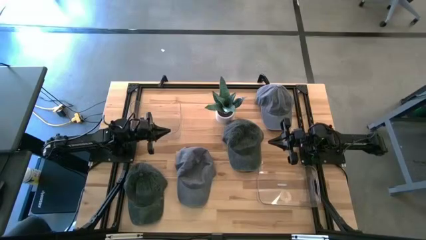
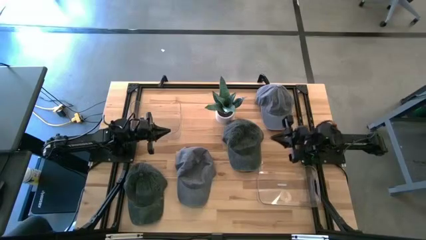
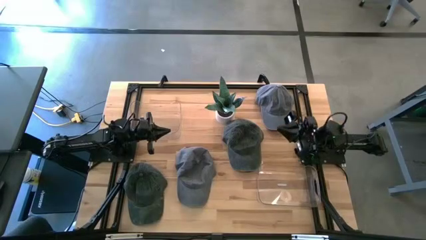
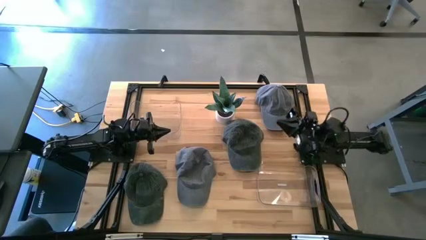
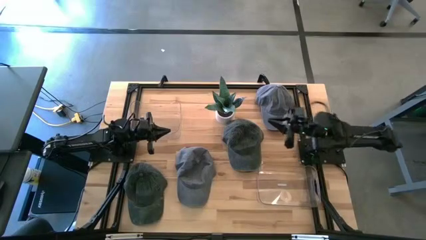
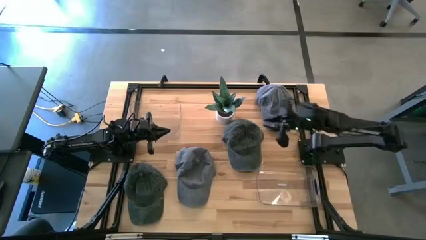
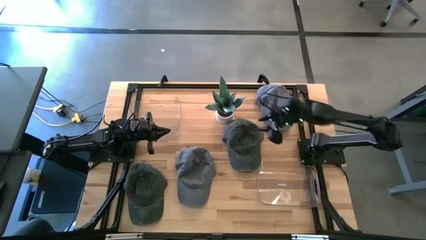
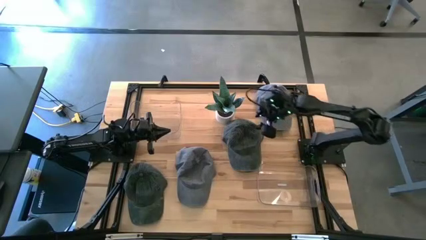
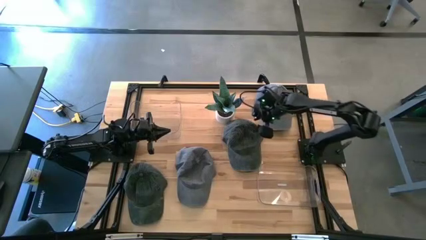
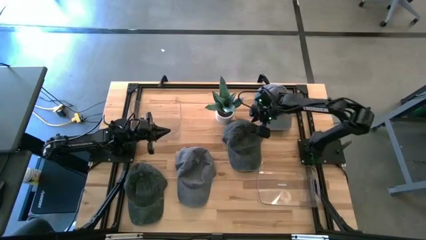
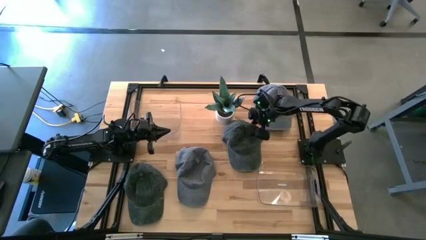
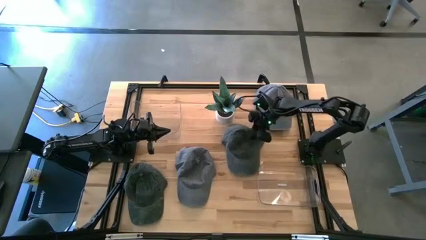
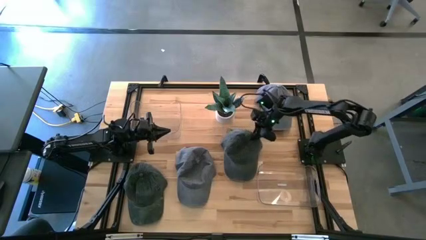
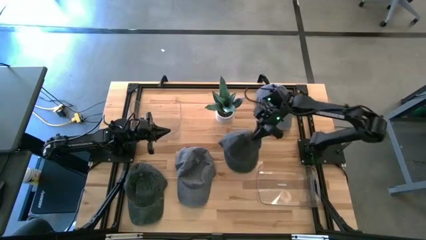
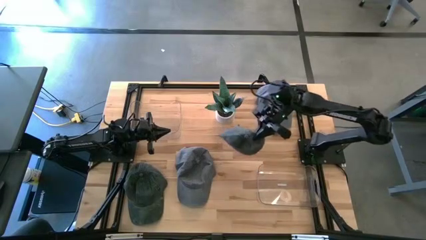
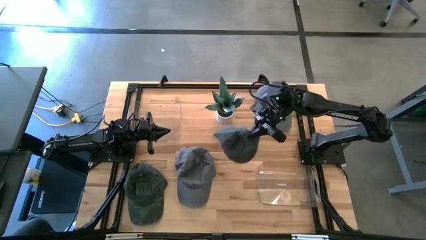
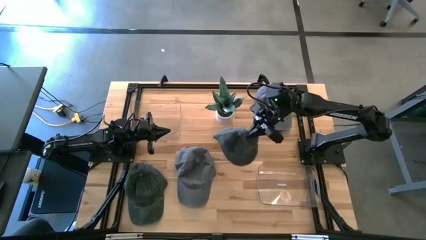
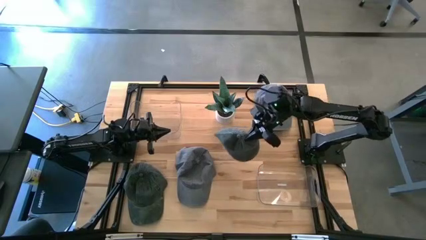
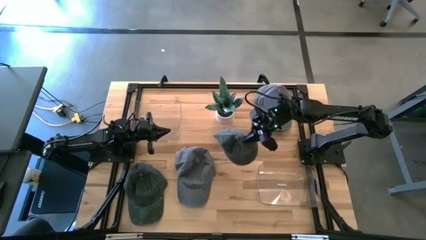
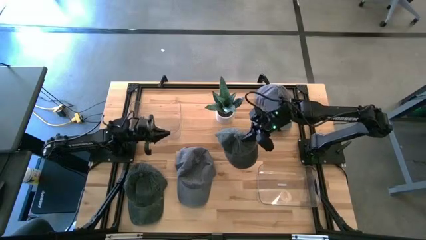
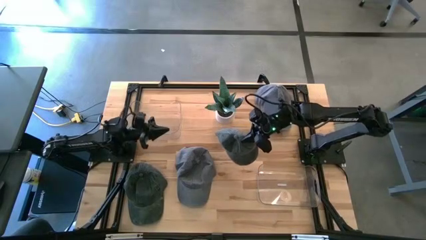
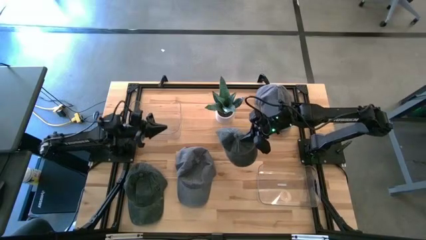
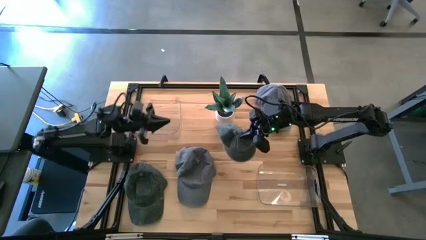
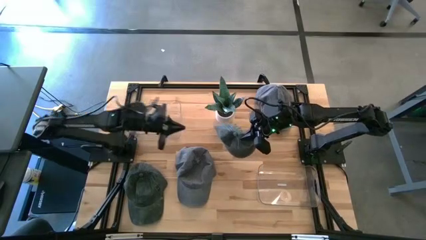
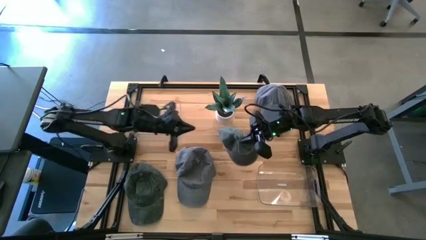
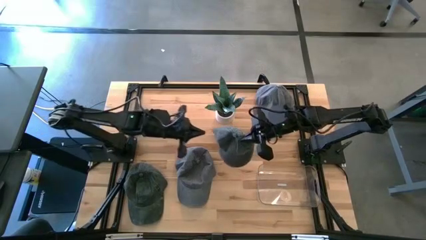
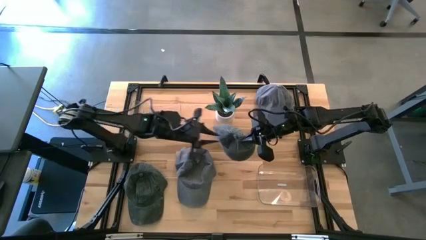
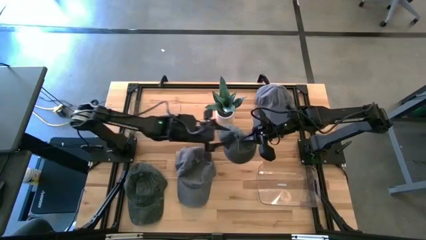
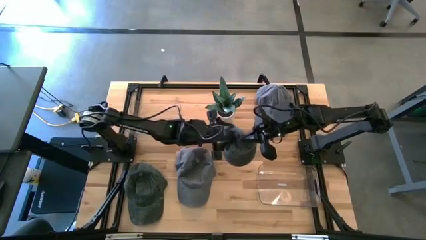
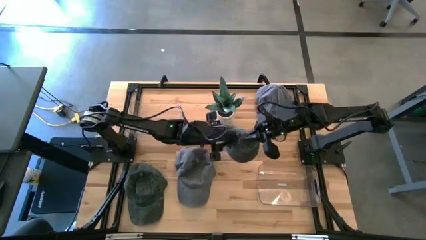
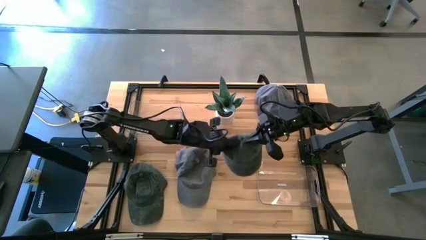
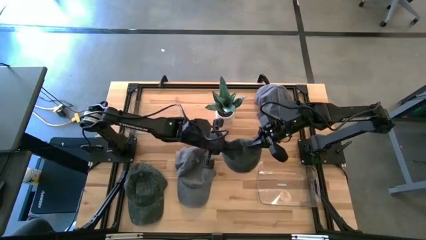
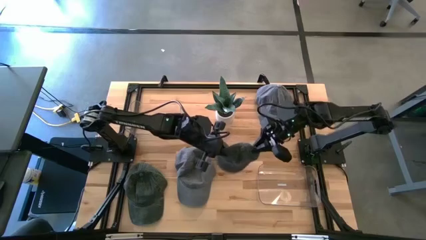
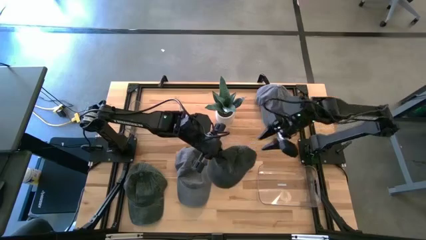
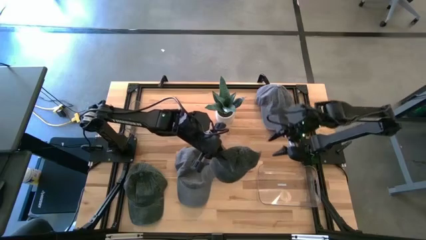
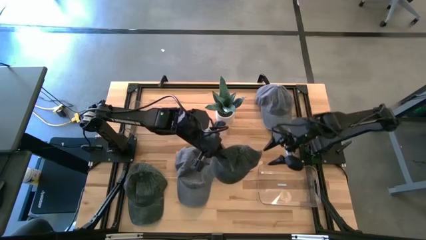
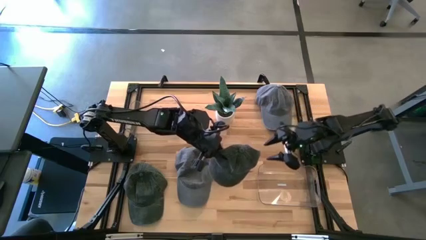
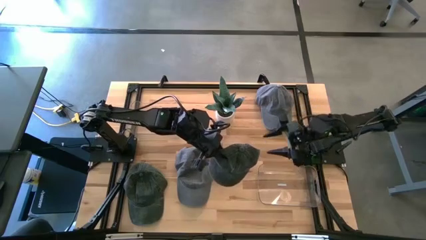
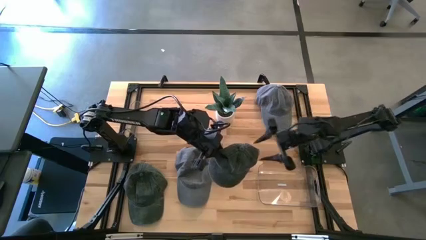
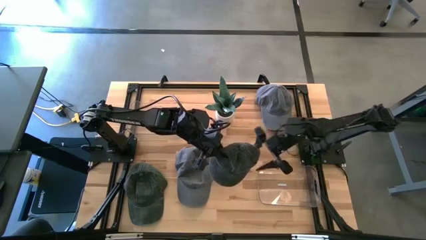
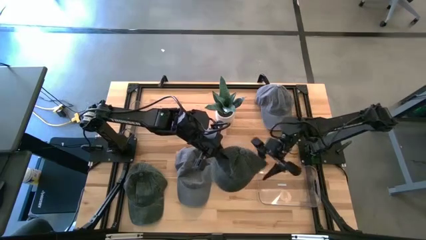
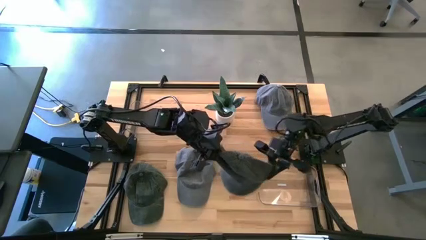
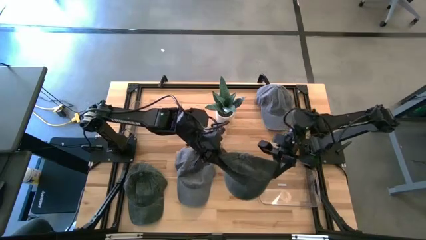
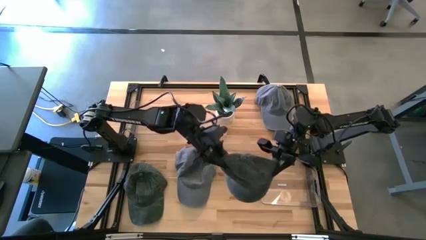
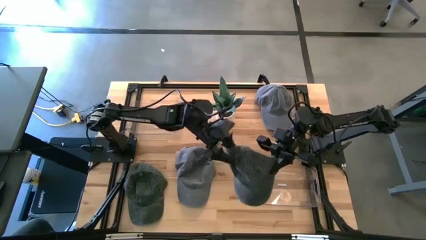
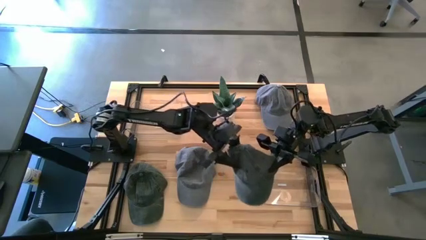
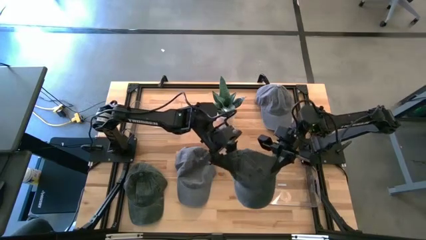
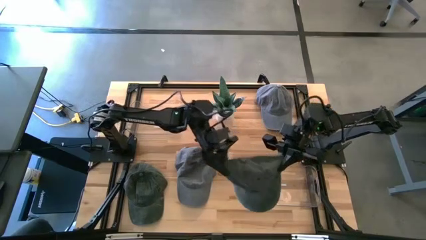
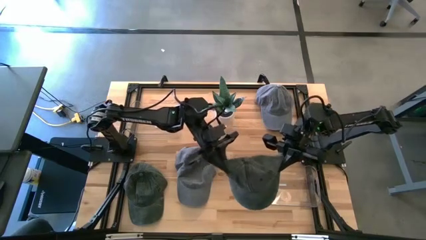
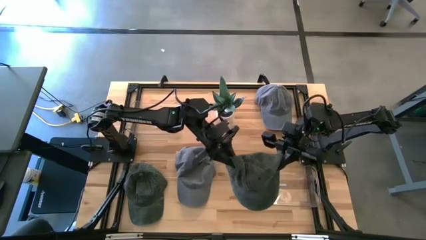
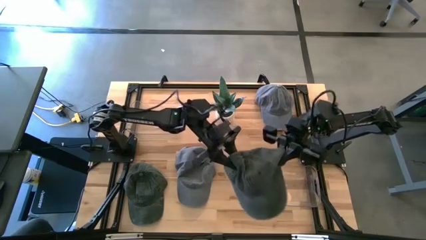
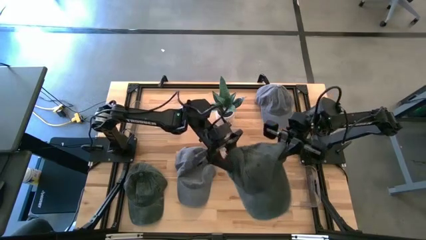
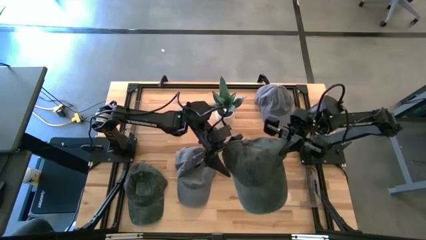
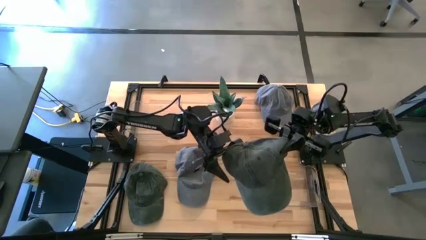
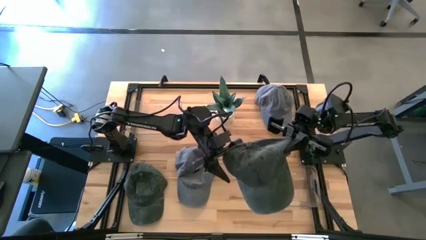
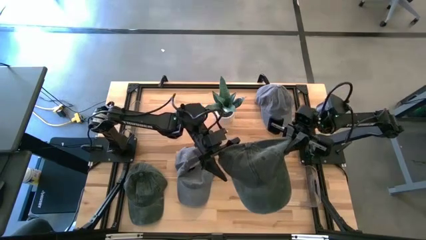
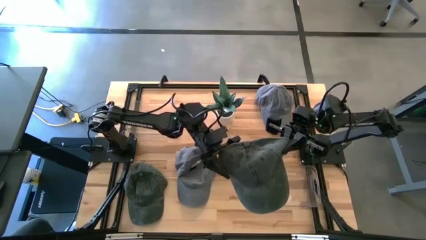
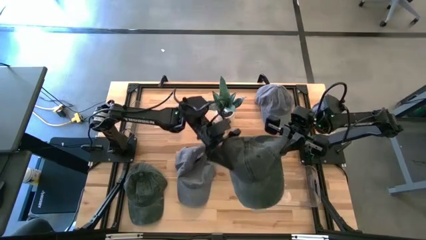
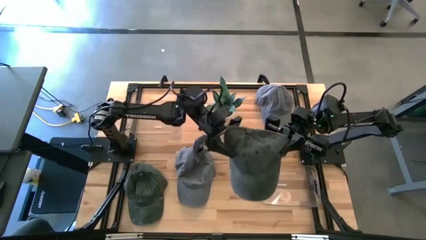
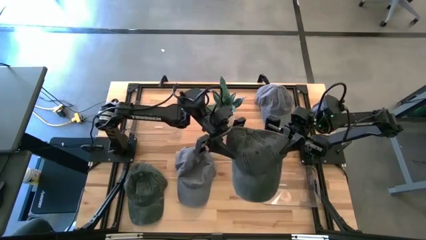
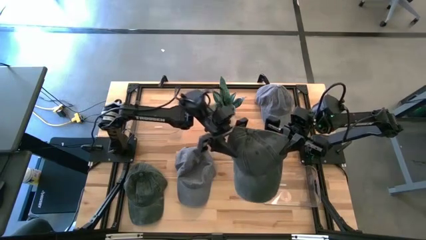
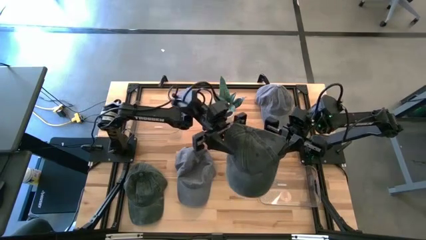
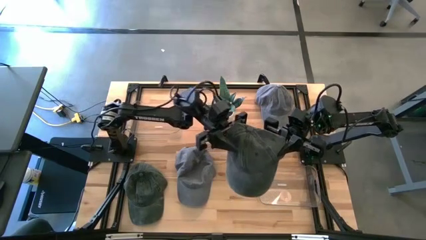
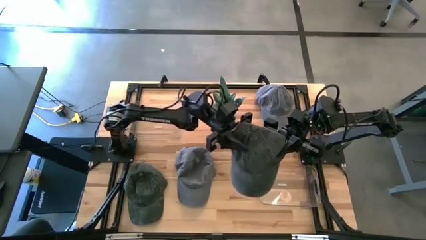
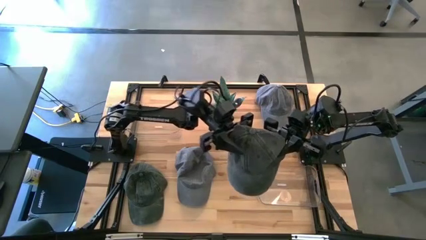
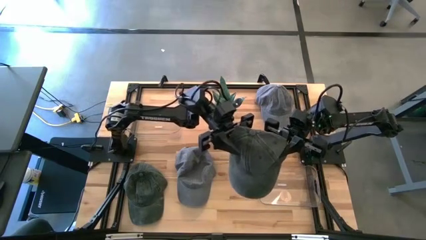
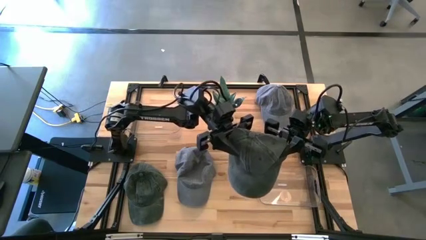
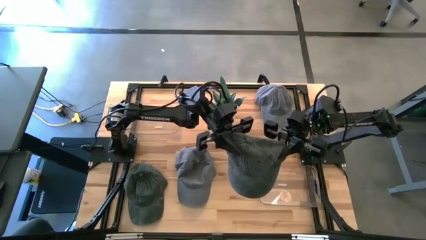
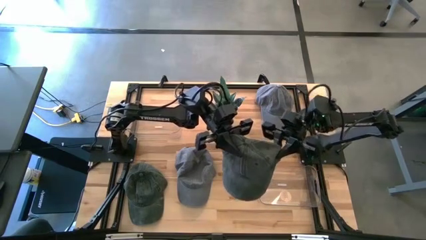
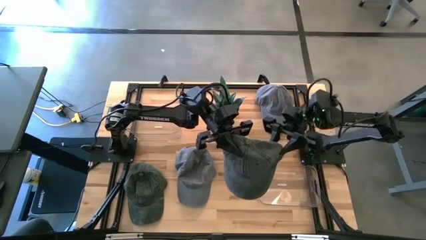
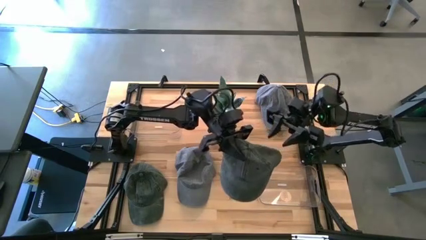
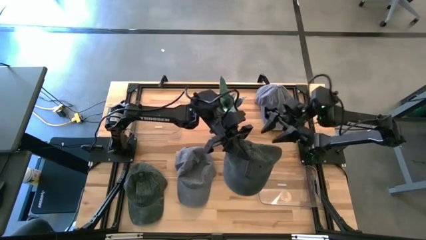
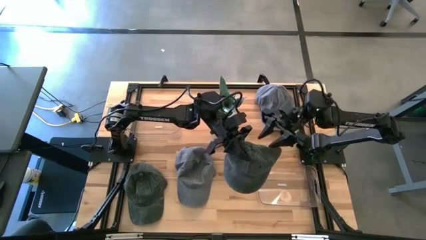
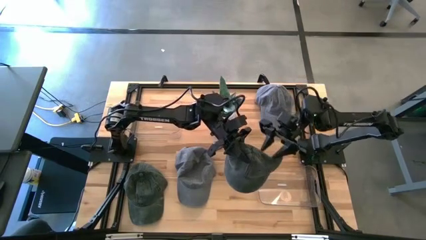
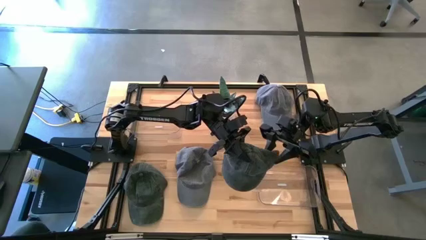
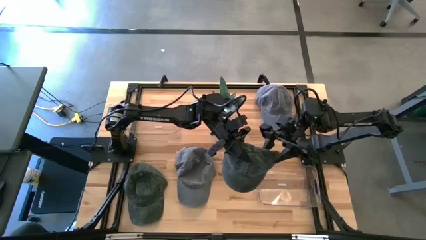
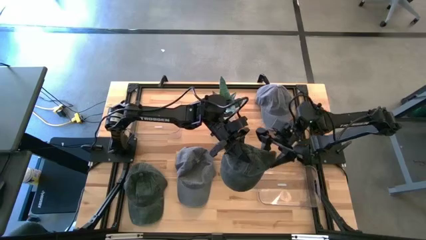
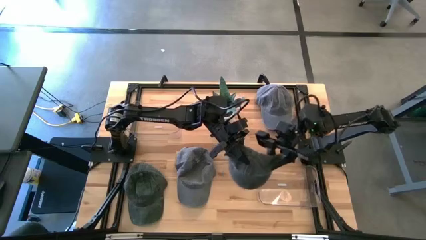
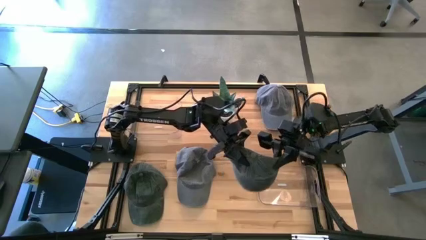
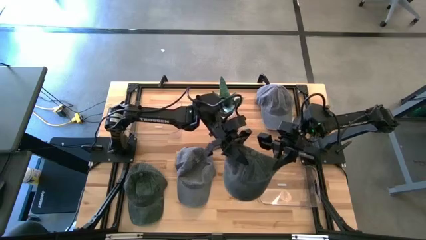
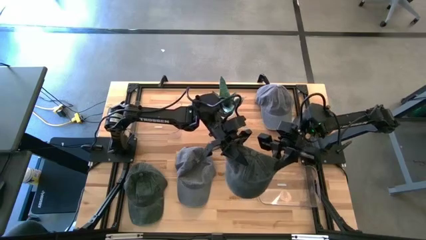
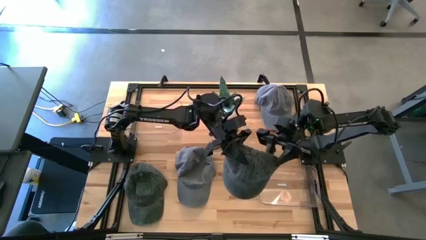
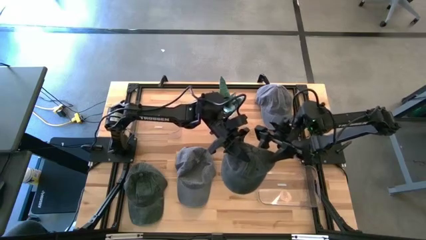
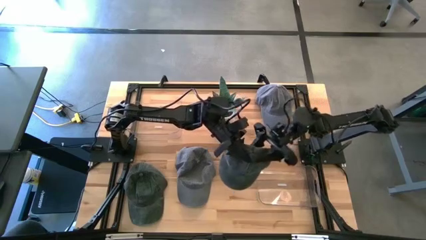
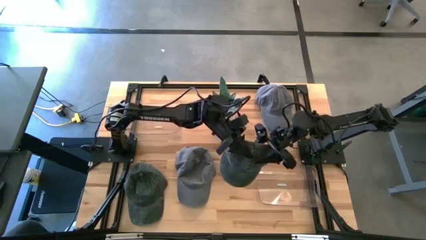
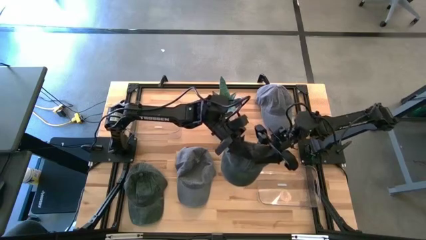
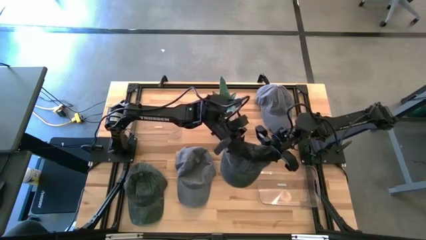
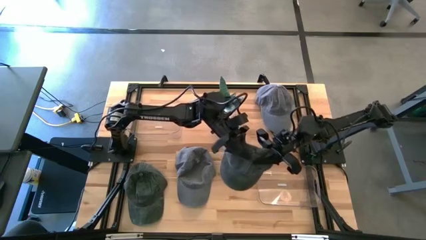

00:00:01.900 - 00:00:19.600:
Task: Pick & Place hat
Put the right black cap into the right transparent bin
